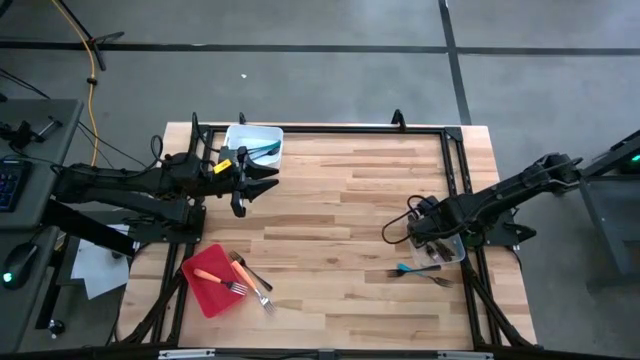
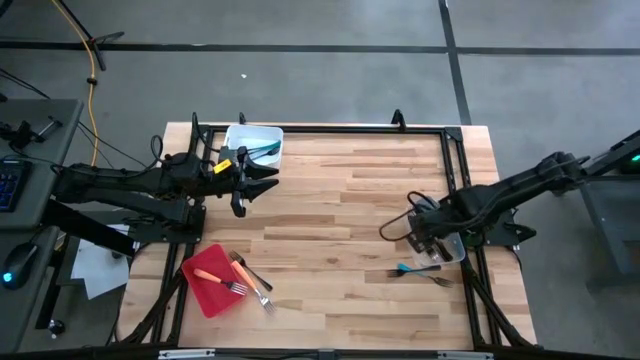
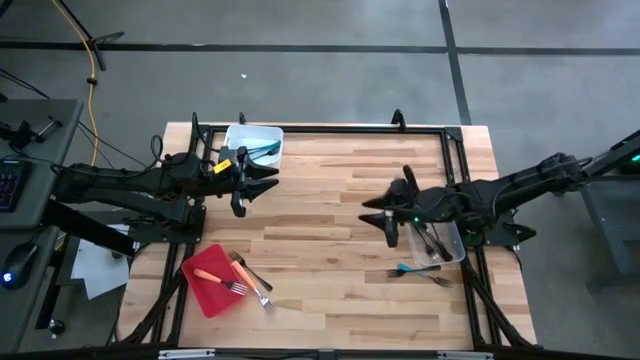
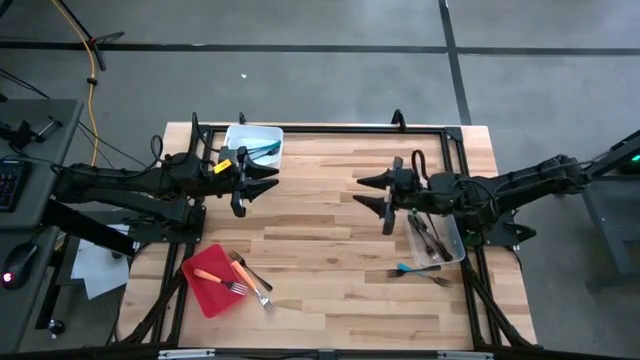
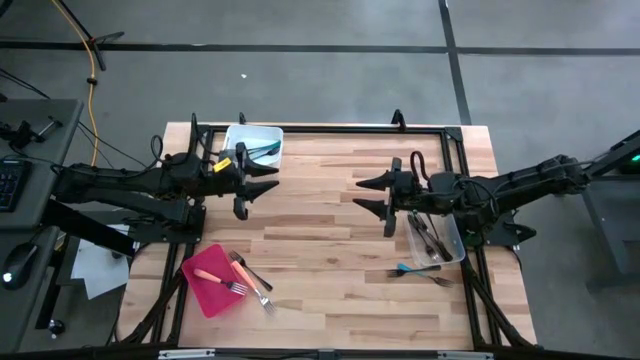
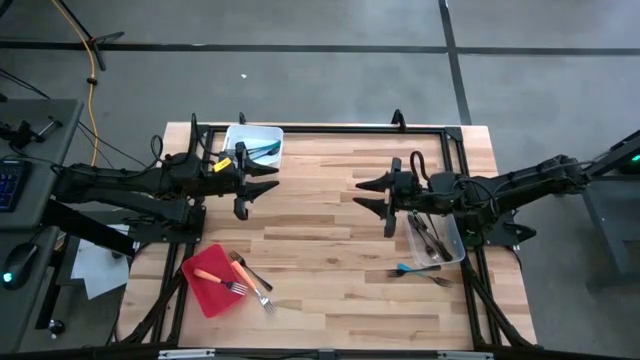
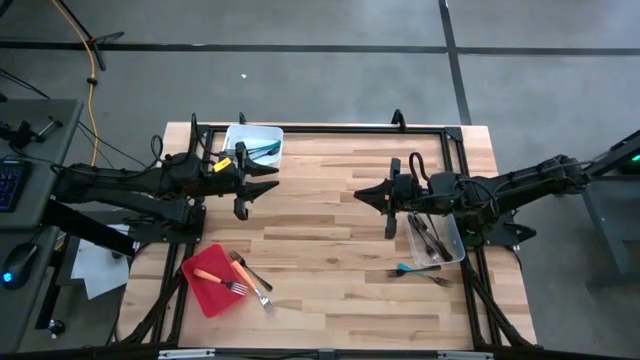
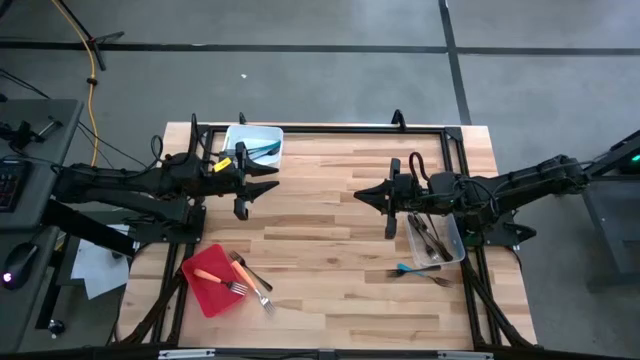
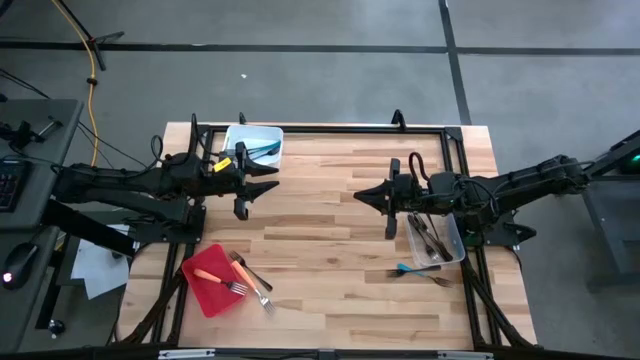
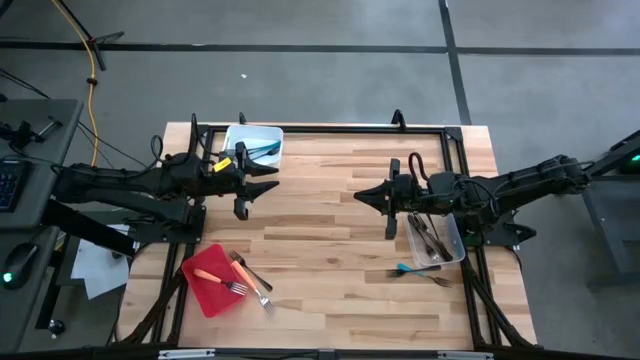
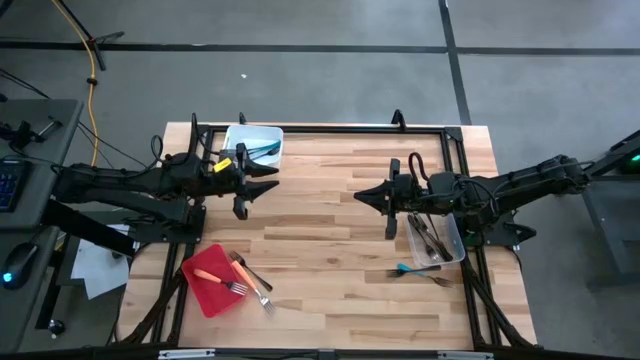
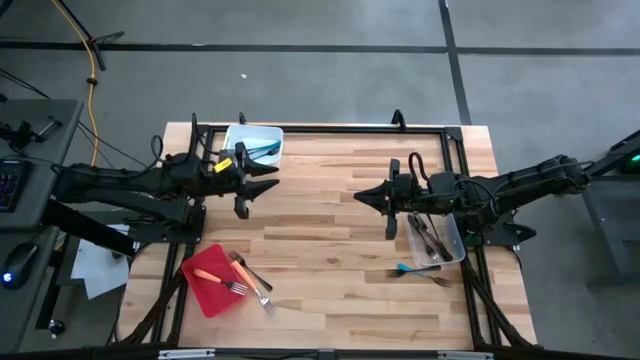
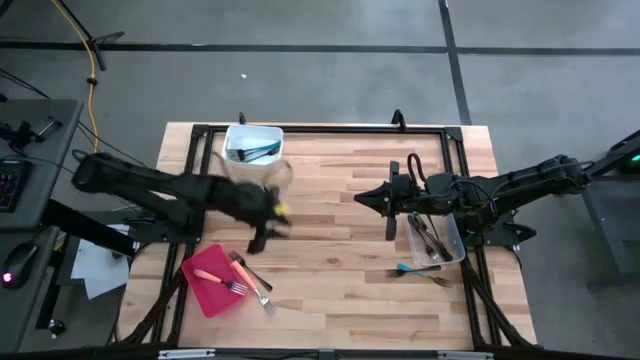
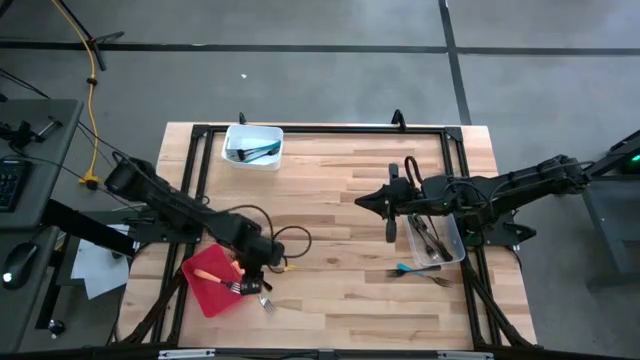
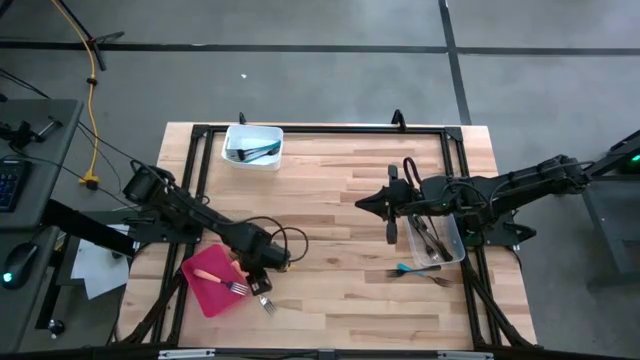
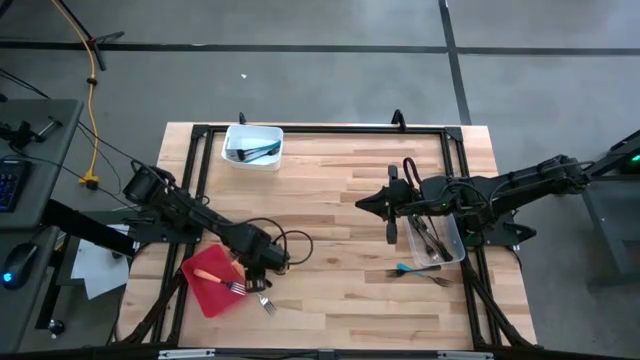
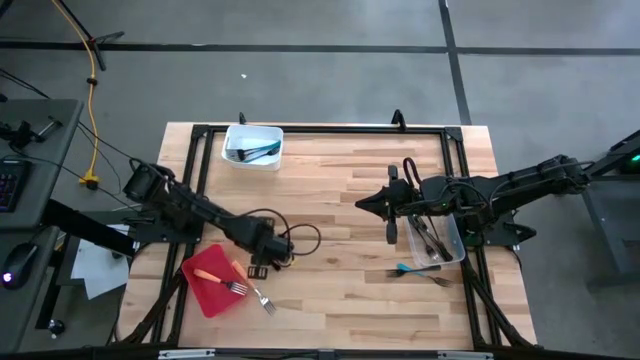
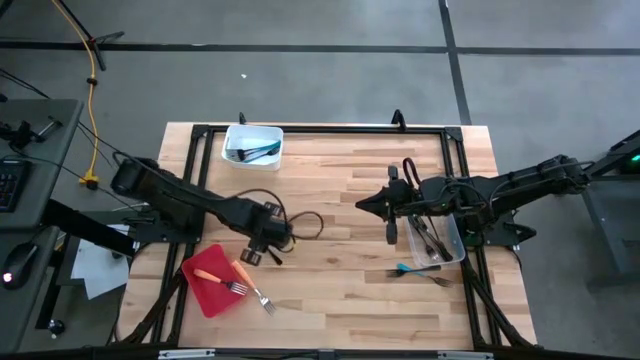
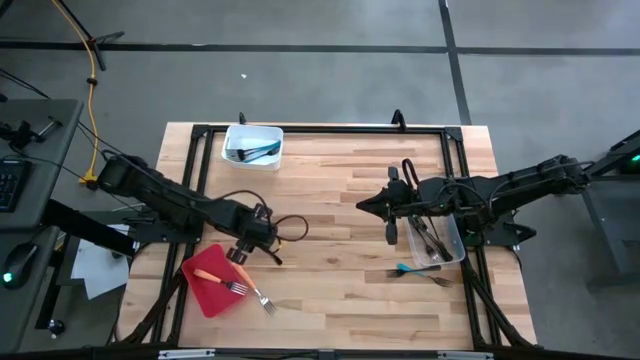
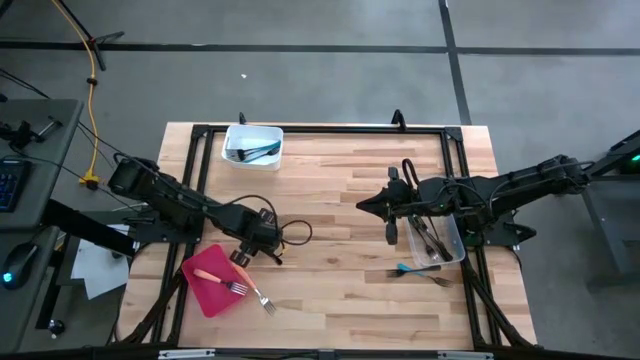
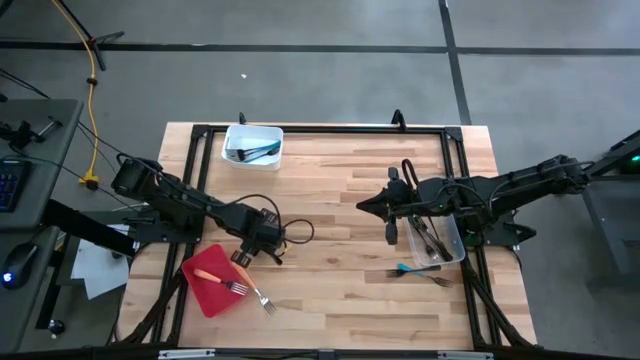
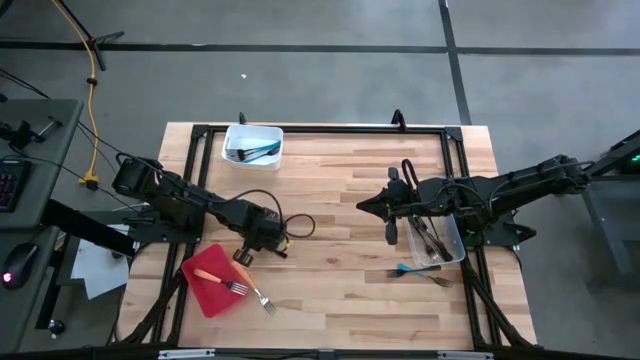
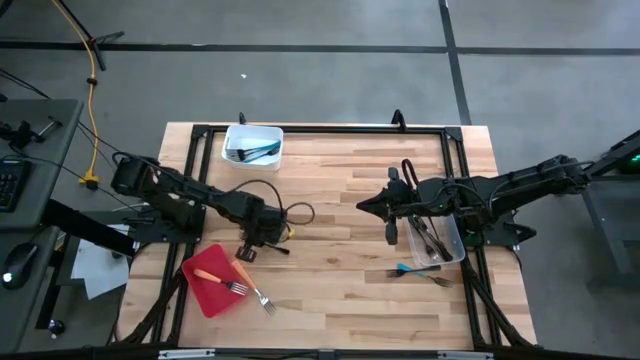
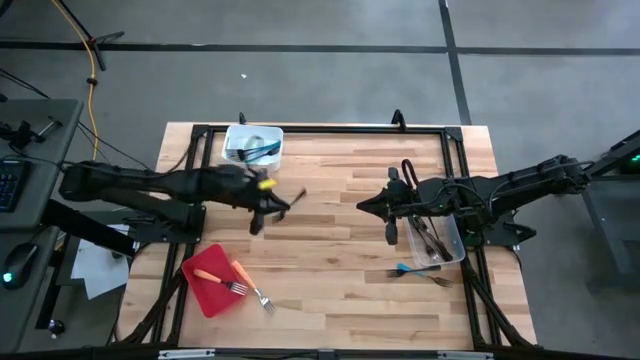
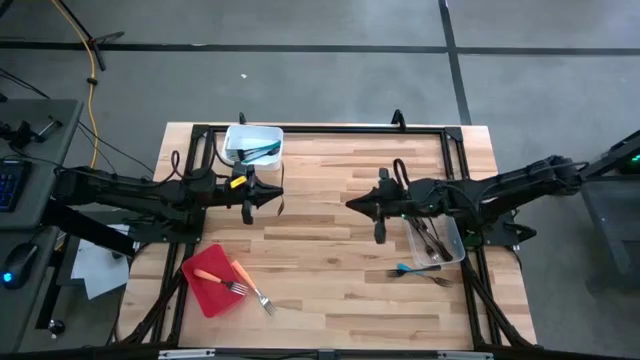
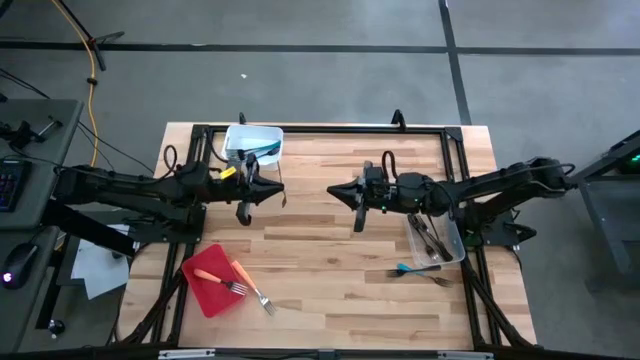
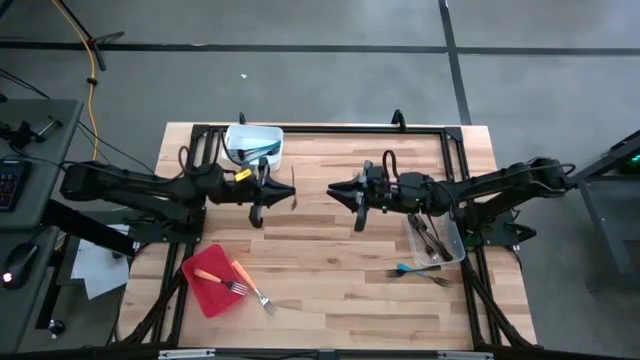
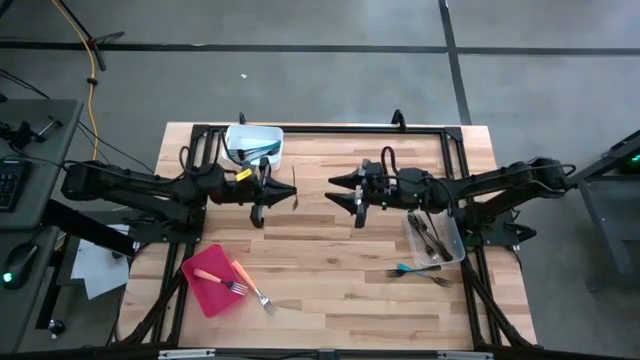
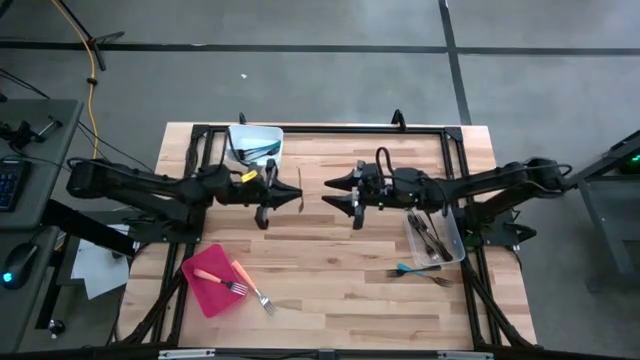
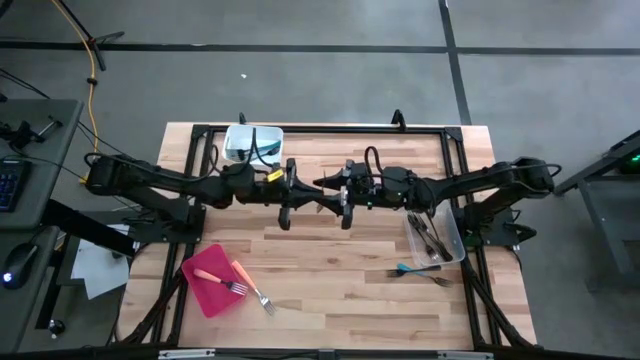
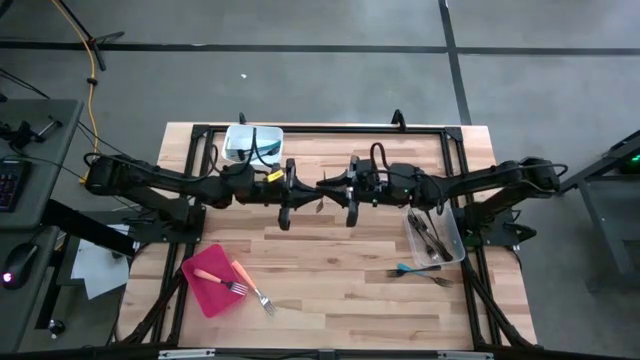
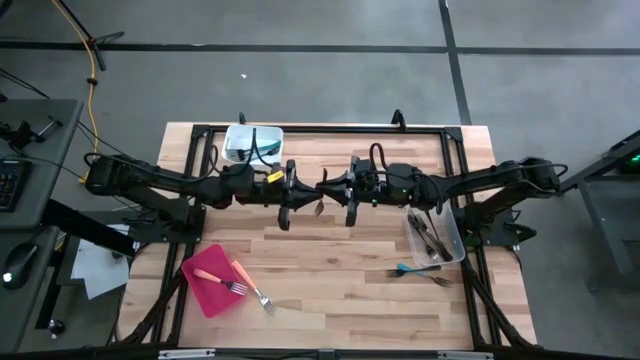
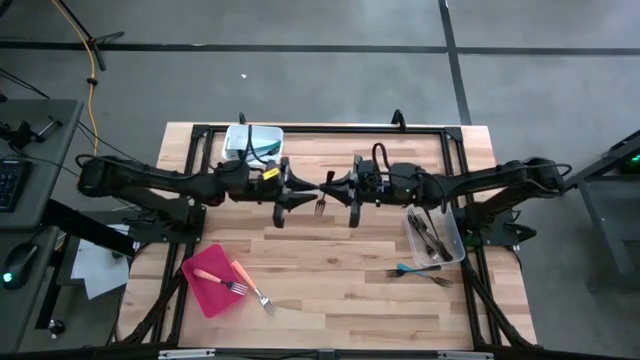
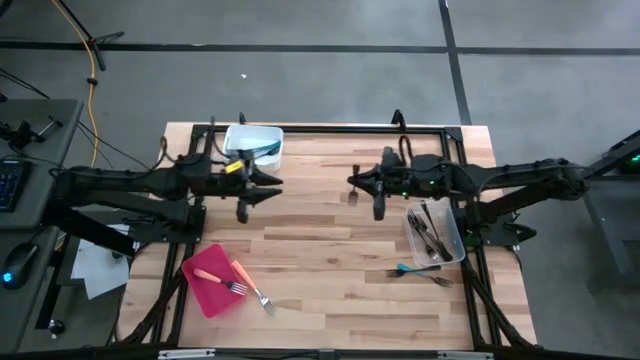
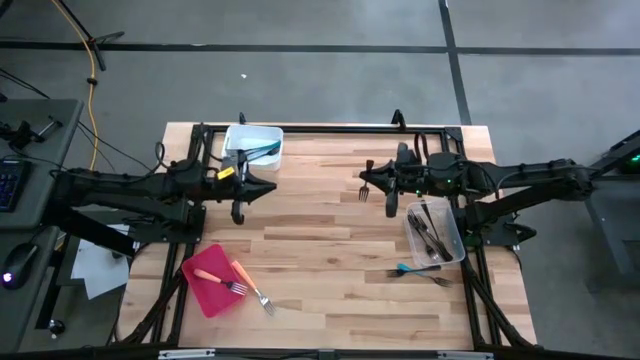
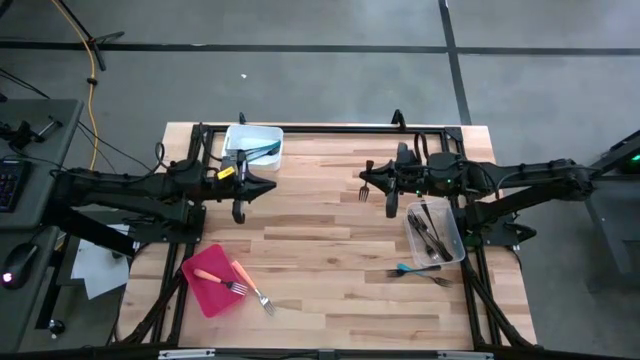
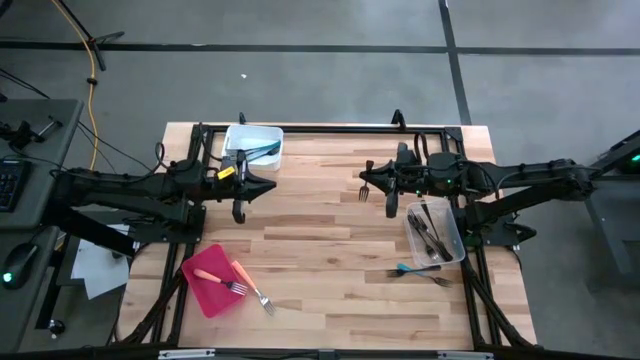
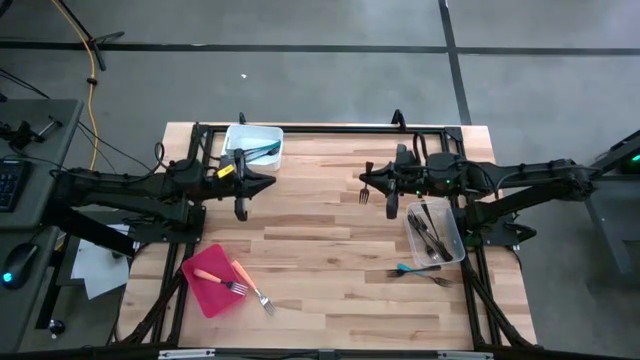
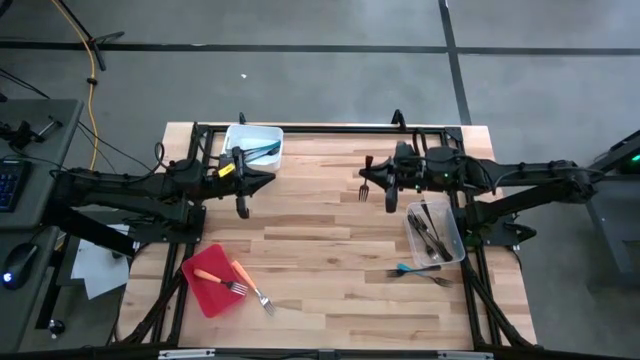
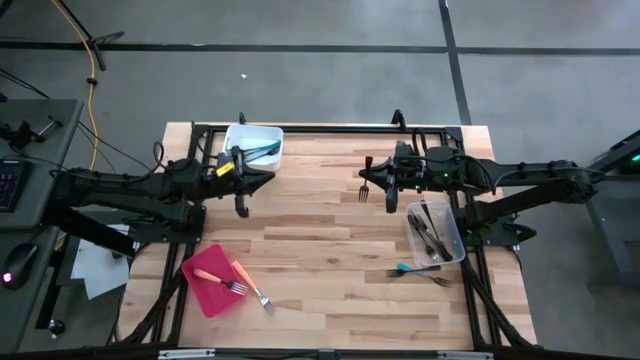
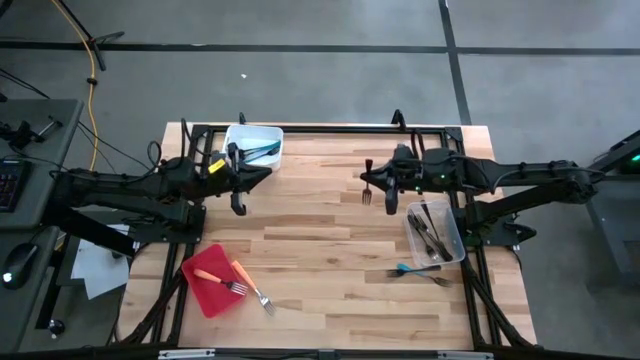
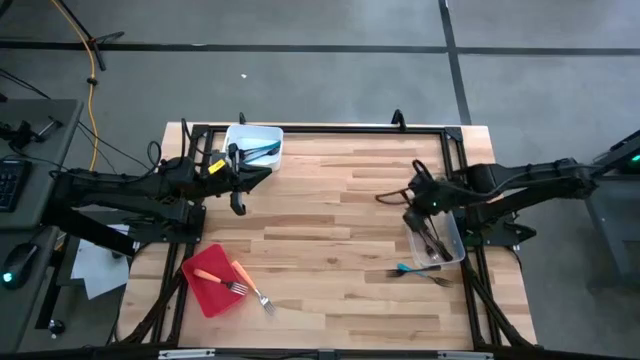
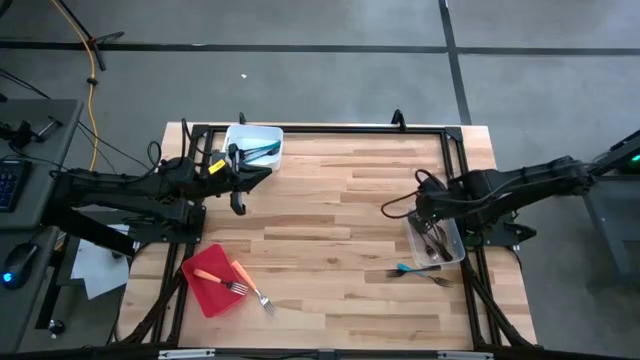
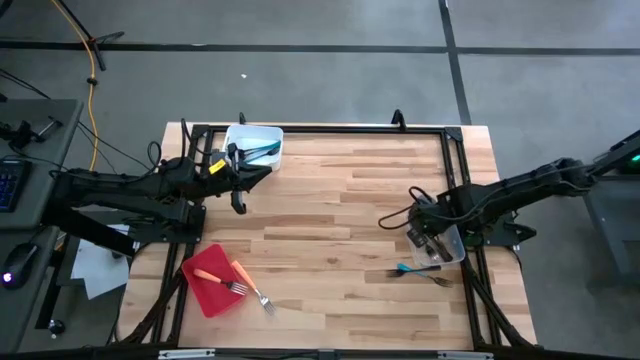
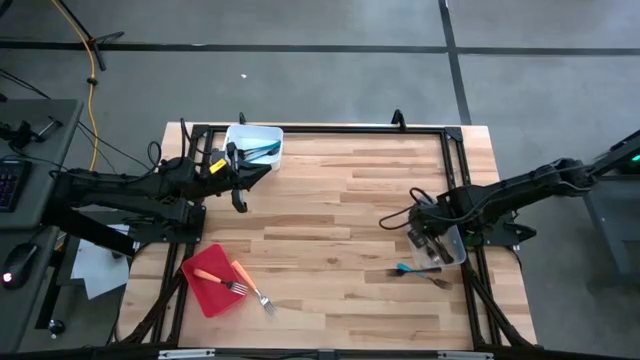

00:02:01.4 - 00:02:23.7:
Task: Sort silverware by color (type)
Put the black fork into the transparent bin
